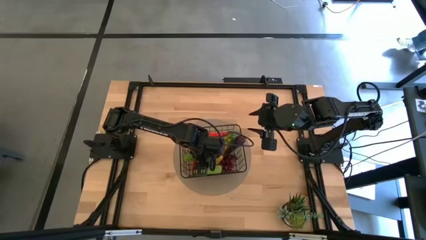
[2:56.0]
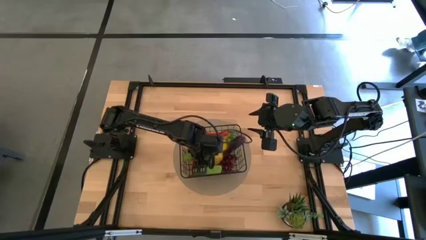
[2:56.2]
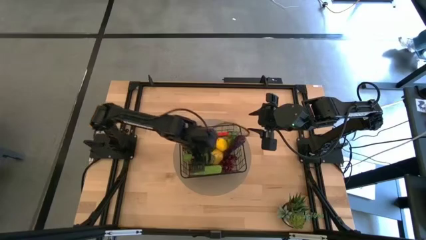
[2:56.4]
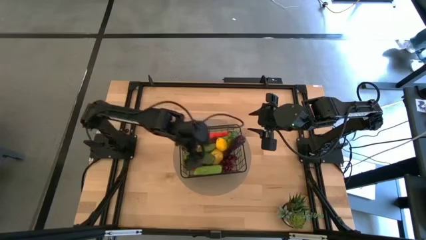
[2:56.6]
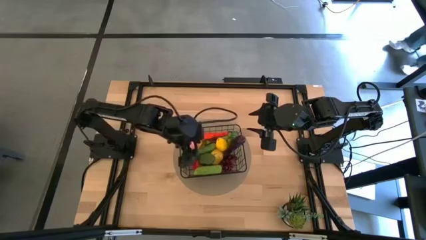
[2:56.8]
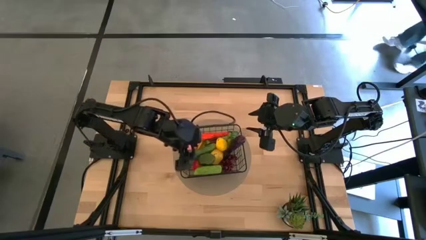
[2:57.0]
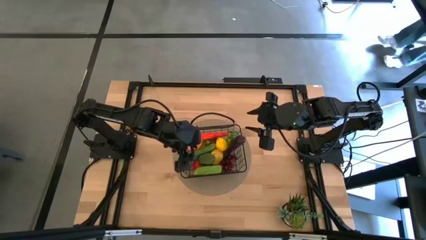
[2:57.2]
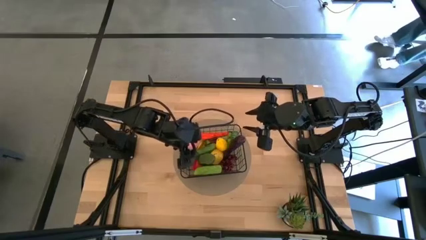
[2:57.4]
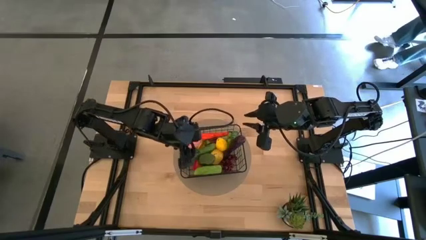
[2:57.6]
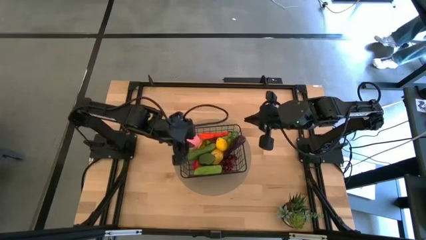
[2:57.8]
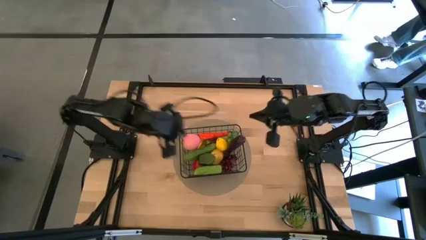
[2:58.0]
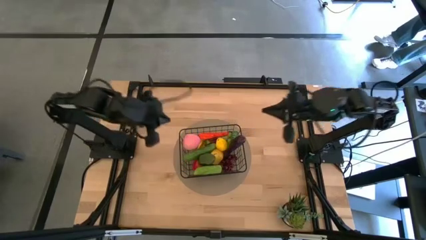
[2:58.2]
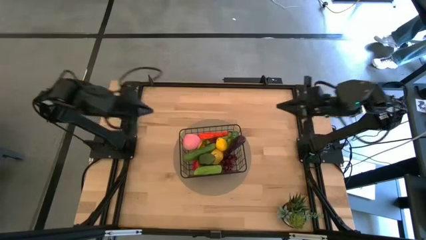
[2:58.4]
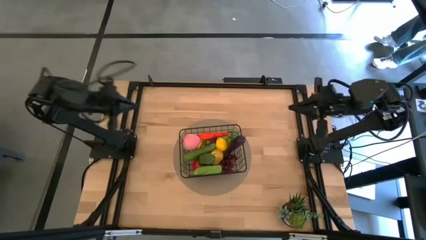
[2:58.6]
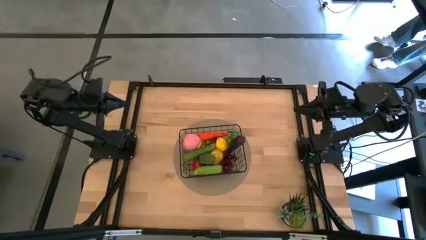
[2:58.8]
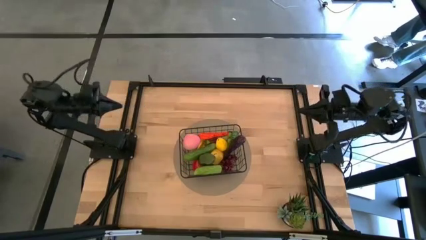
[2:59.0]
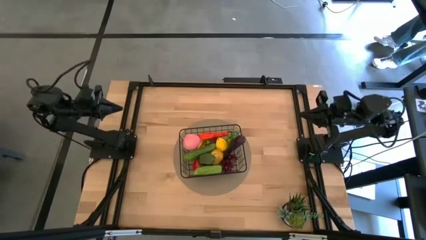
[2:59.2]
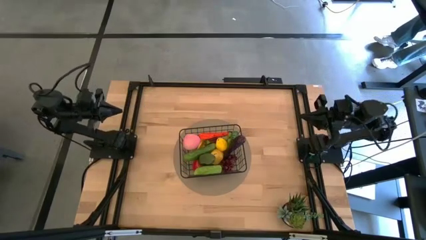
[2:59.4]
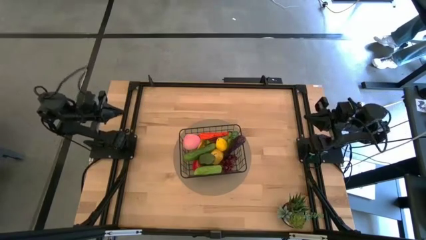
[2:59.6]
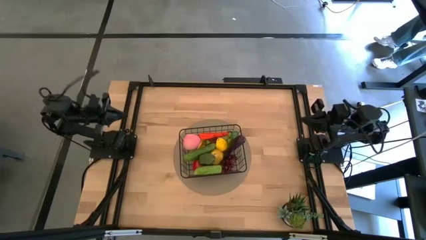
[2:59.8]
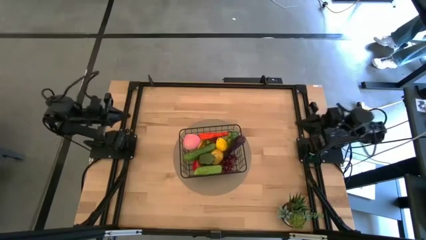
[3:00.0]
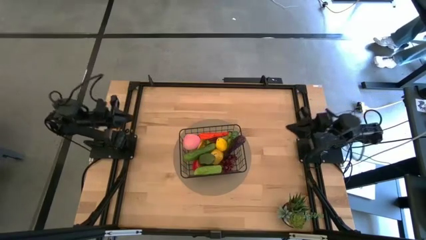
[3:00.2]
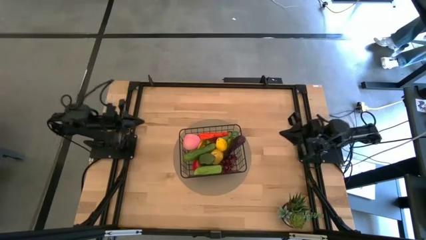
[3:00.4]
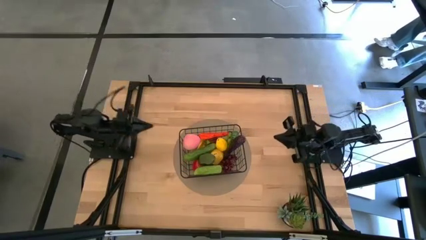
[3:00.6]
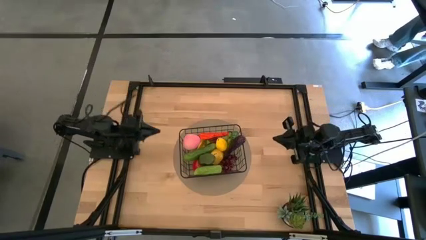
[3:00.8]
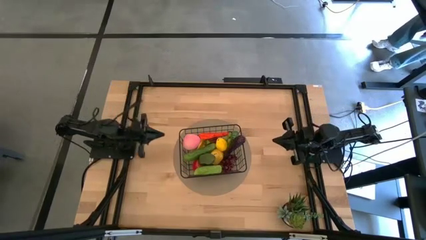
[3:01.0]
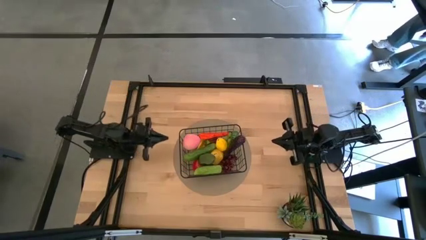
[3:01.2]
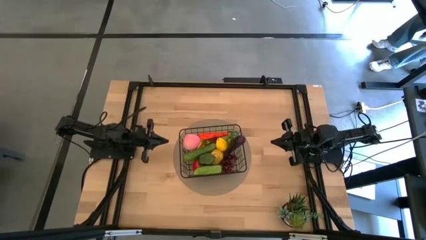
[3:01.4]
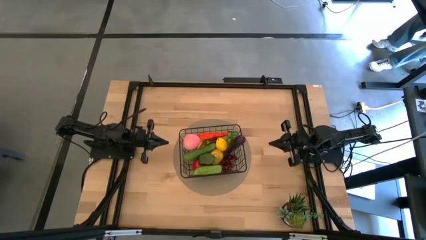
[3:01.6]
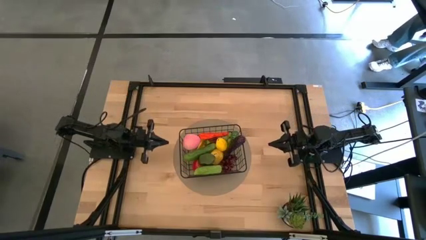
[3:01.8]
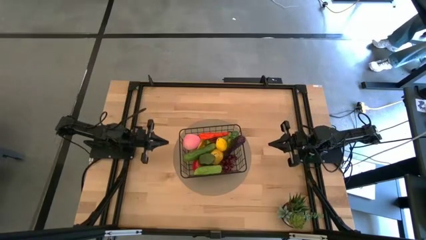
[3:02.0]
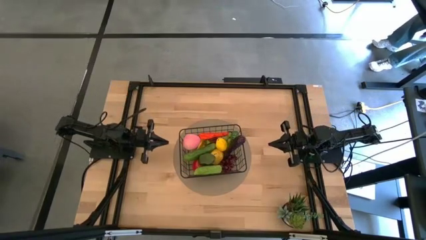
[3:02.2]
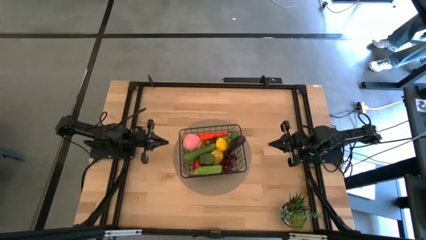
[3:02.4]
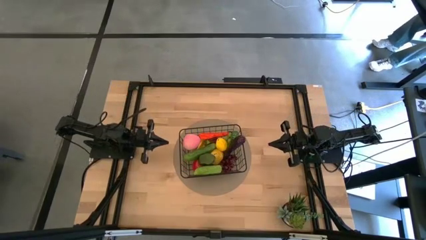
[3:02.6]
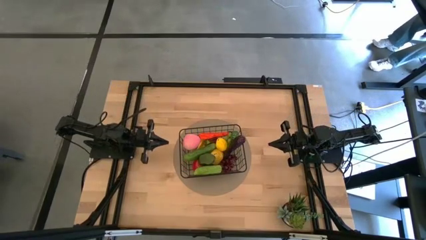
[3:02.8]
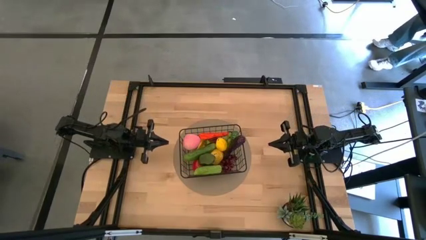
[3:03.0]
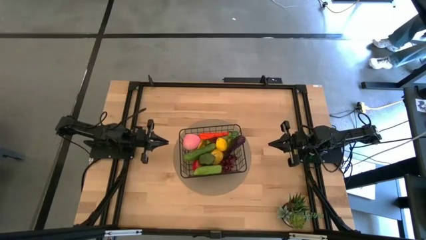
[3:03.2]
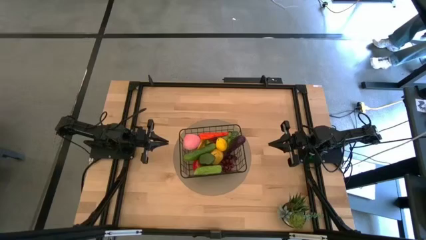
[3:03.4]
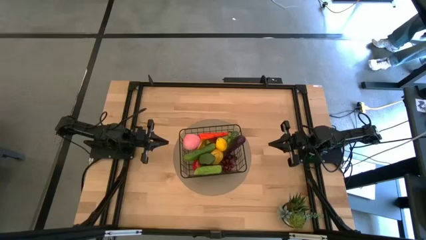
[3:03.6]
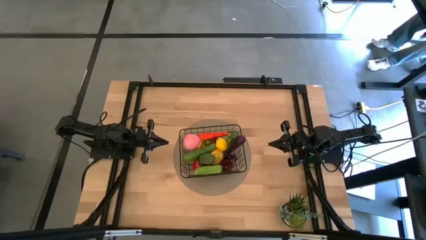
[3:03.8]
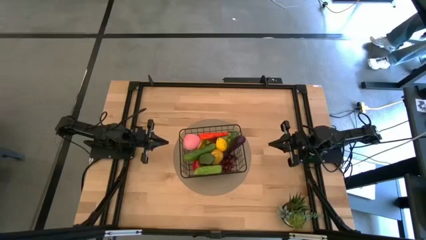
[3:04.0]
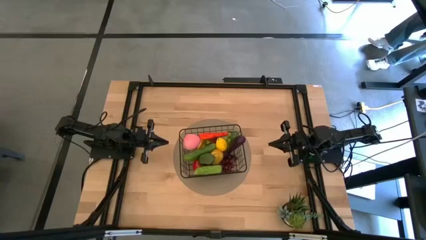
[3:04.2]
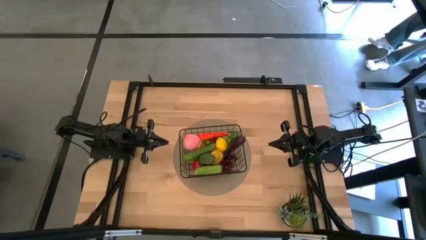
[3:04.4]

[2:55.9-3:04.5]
Task: Build produce basket
Return to Home Position

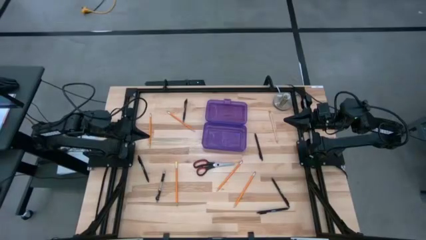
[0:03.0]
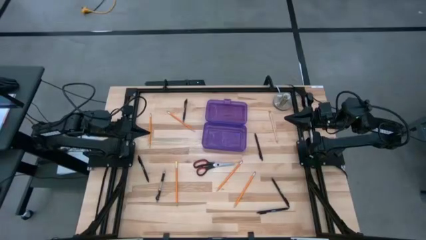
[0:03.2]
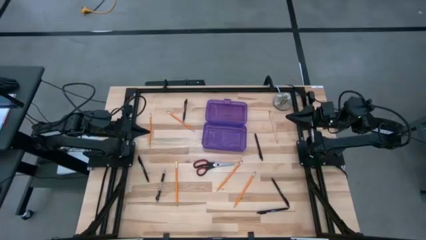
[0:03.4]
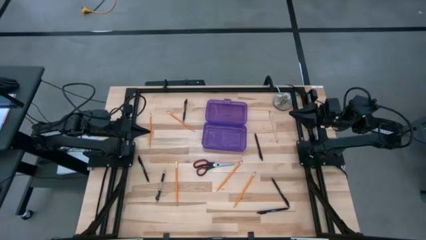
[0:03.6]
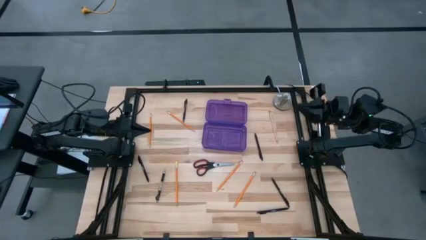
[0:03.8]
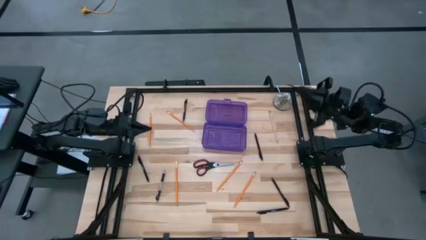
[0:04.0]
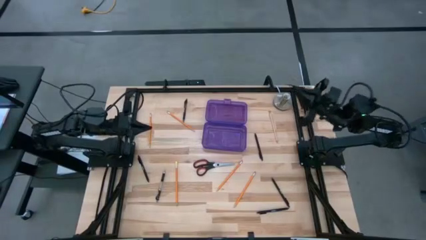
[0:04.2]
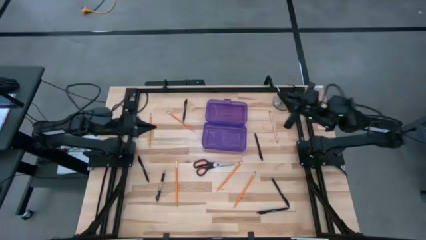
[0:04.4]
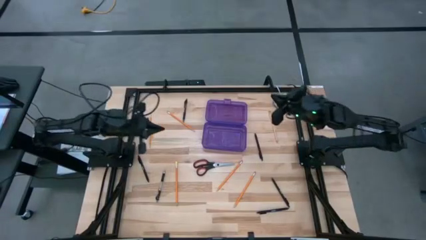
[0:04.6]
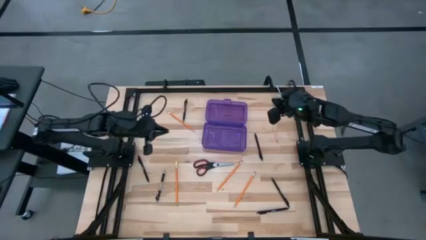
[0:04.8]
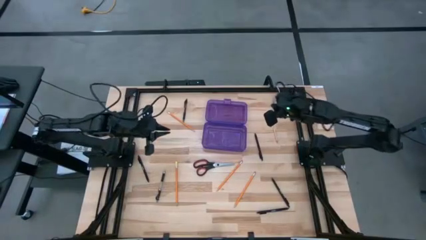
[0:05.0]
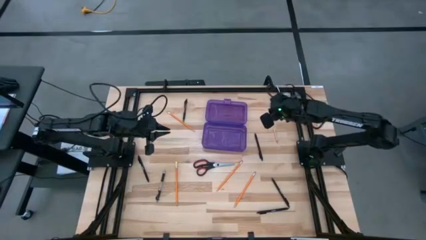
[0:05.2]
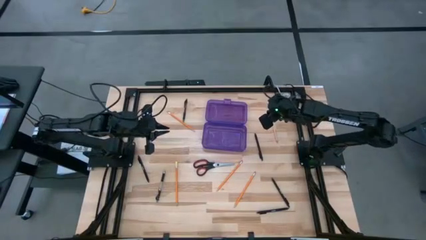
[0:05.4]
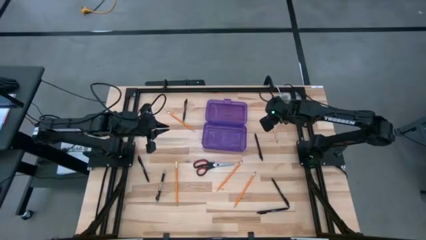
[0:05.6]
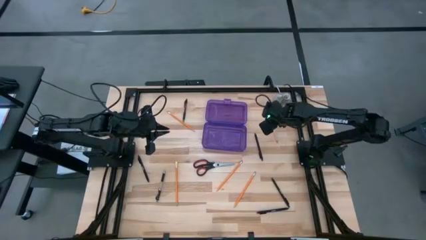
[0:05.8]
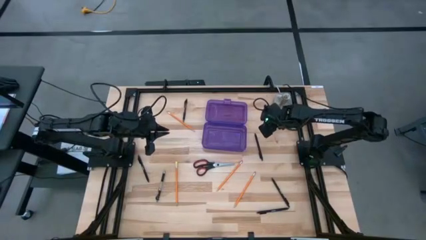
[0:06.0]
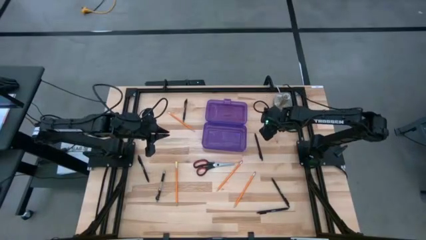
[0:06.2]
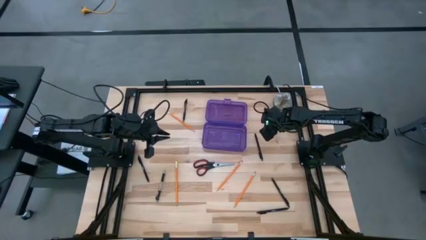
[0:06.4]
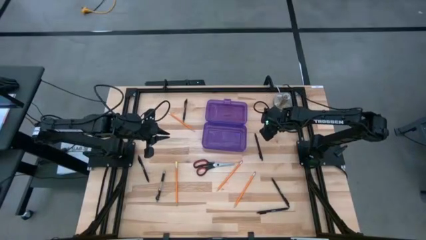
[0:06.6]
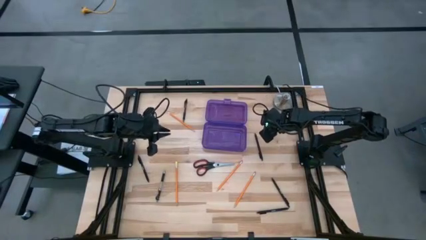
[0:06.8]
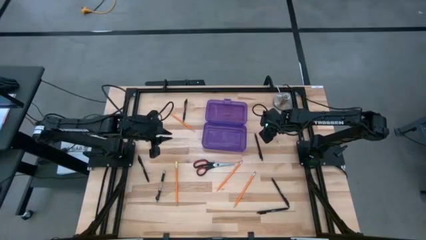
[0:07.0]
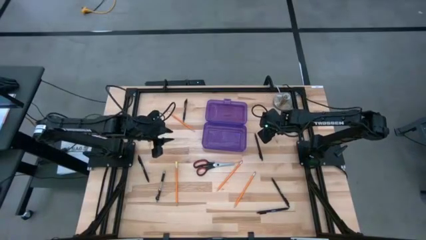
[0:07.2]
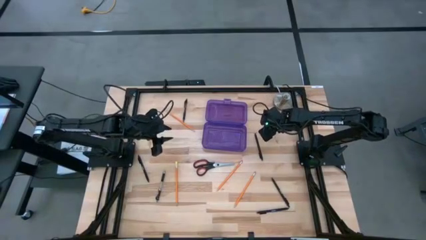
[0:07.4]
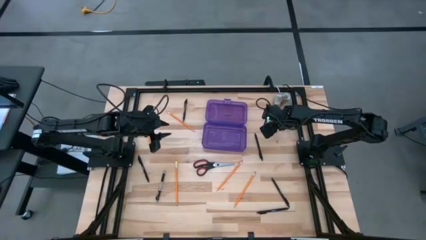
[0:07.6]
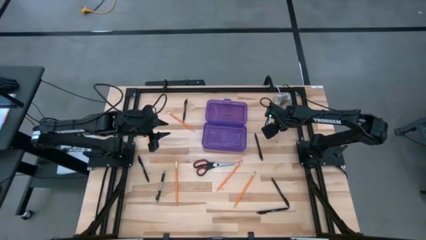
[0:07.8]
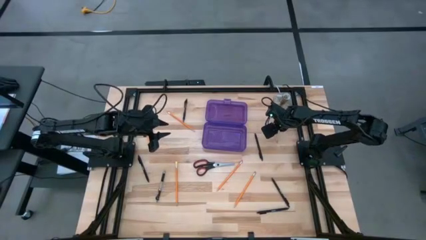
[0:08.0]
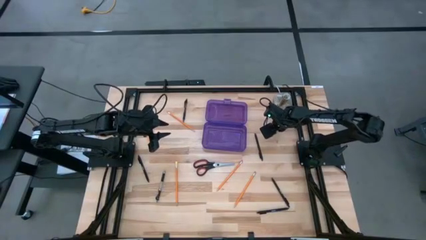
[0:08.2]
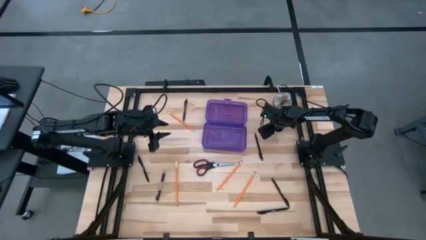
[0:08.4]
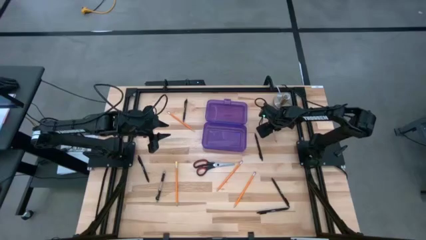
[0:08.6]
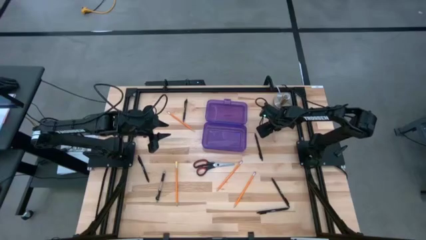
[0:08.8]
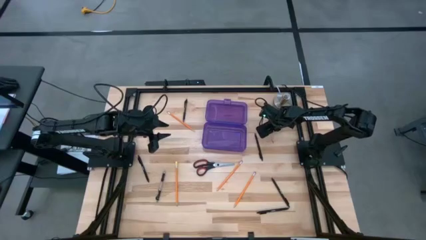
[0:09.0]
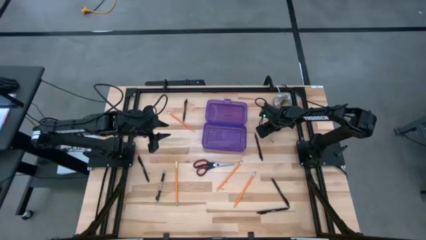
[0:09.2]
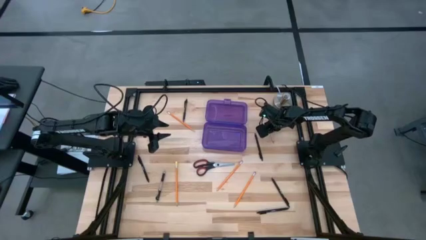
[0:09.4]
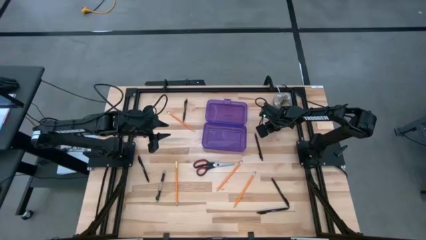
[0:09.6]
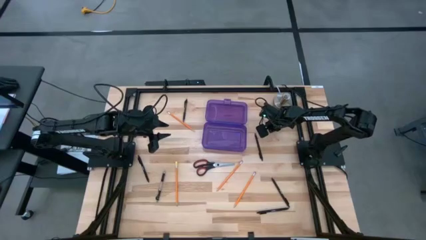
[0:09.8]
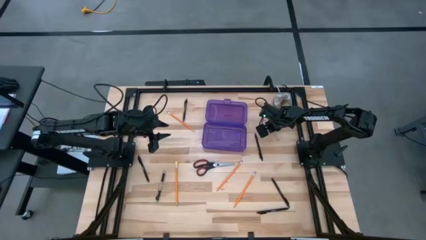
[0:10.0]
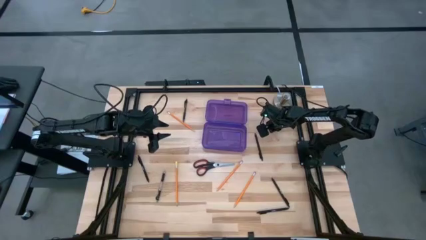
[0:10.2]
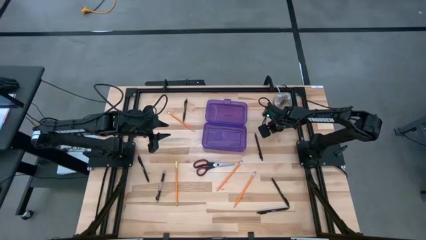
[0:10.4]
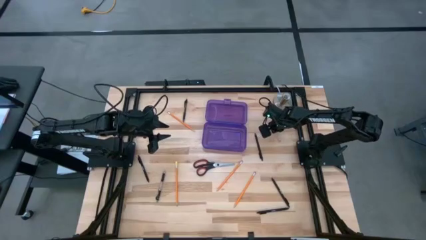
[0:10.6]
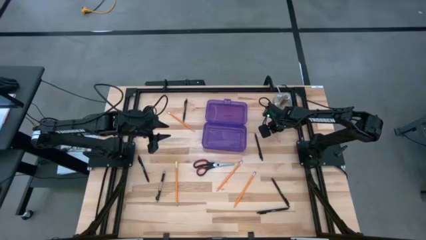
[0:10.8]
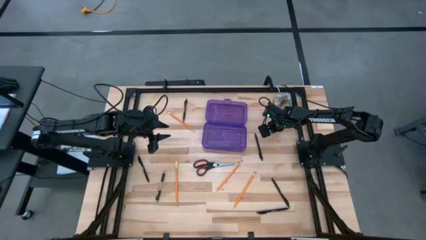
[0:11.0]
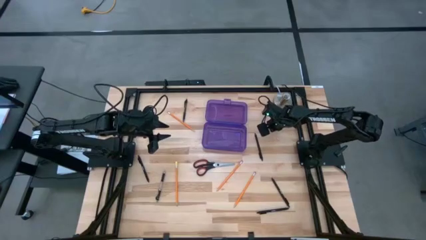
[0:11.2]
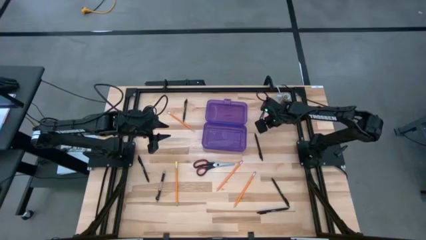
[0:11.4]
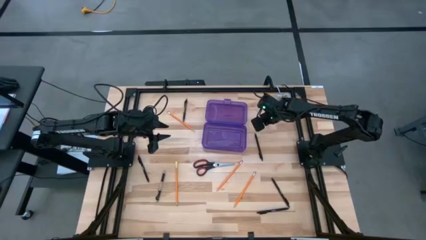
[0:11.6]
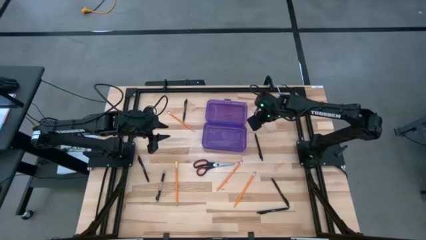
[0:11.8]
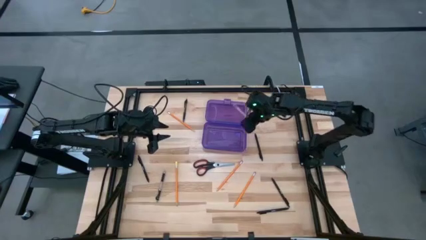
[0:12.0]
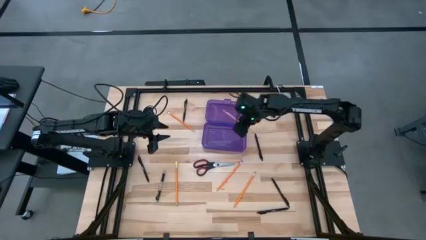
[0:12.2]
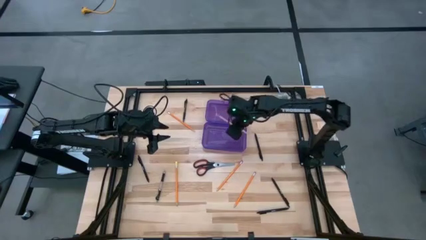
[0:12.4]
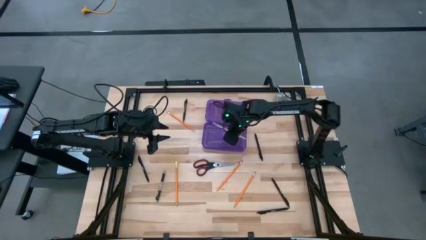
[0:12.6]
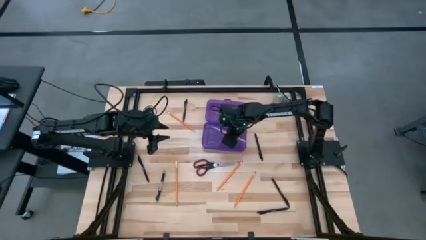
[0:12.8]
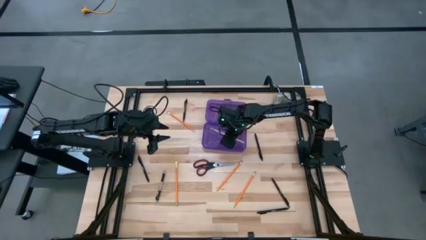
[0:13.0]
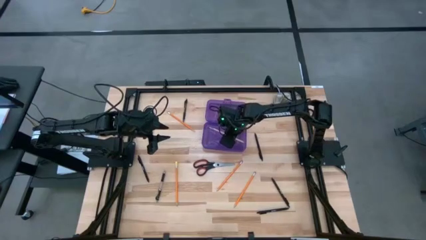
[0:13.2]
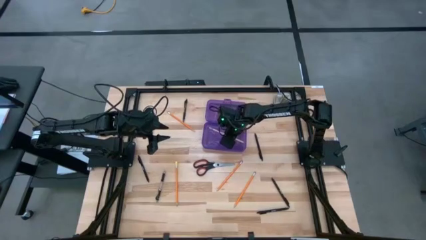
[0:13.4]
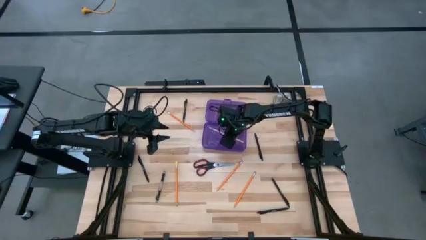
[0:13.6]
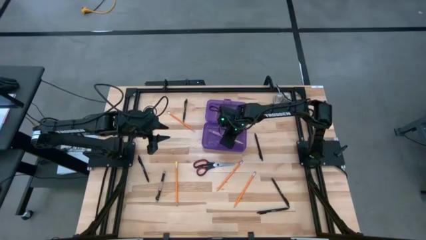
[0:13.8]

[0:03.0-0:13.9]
Task: Pick & place school supplies into a supply box
Put the pink pencil into the pencil box
